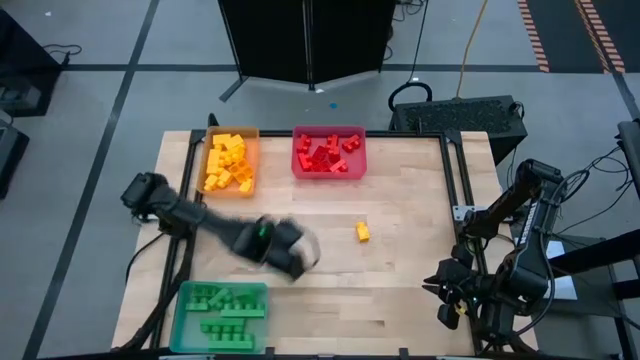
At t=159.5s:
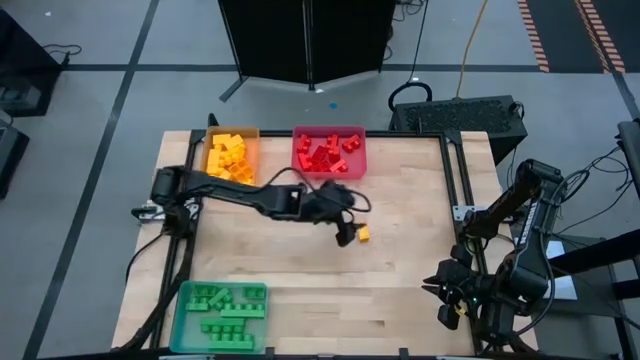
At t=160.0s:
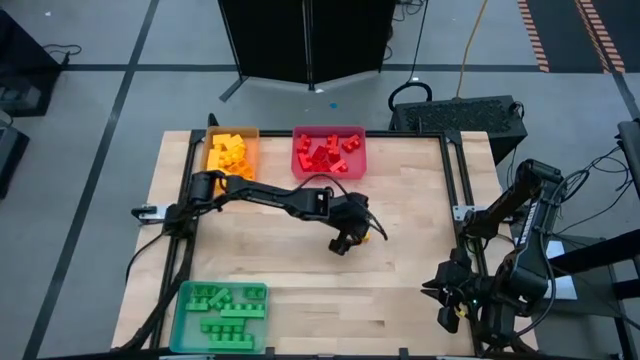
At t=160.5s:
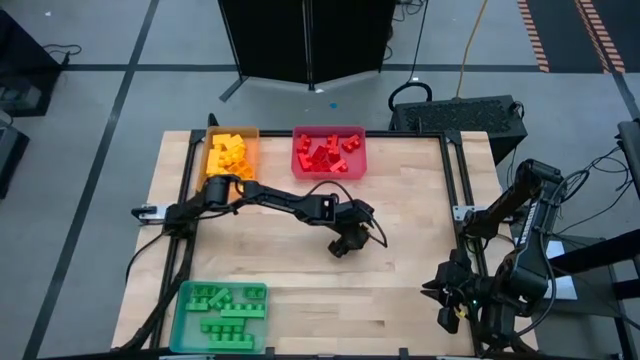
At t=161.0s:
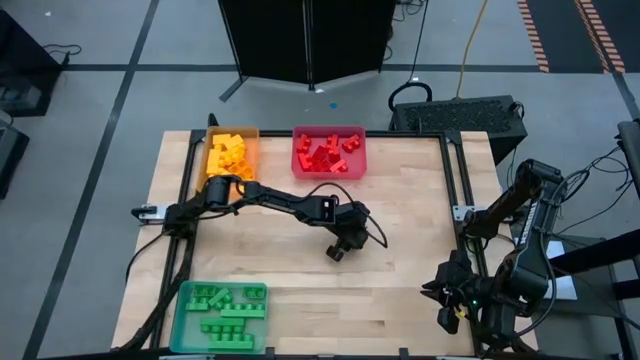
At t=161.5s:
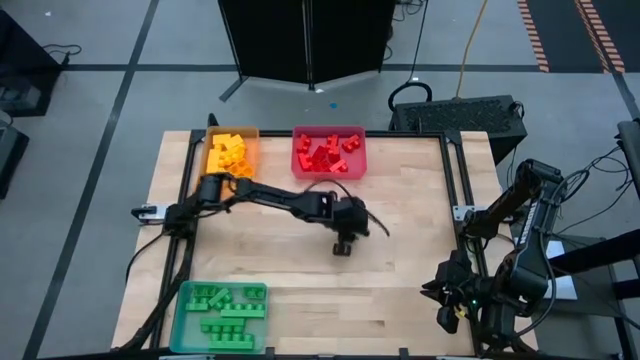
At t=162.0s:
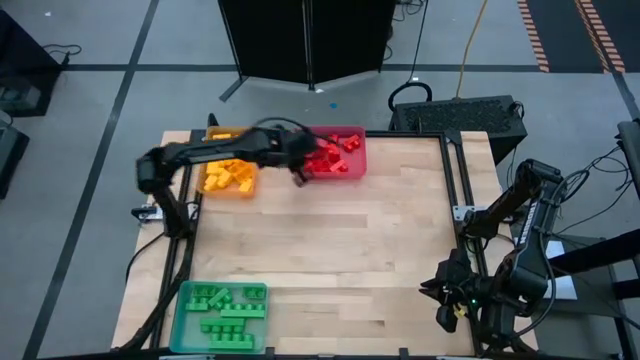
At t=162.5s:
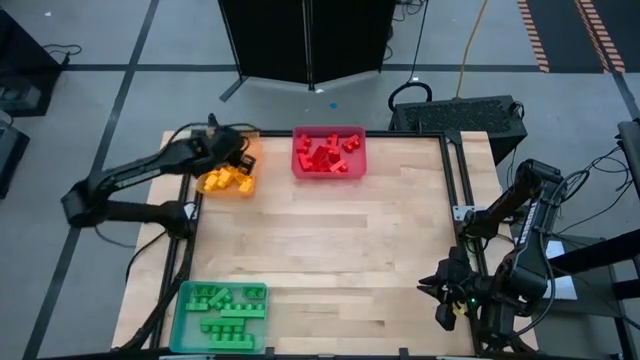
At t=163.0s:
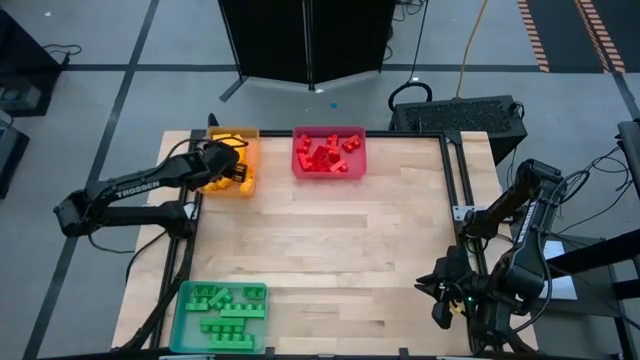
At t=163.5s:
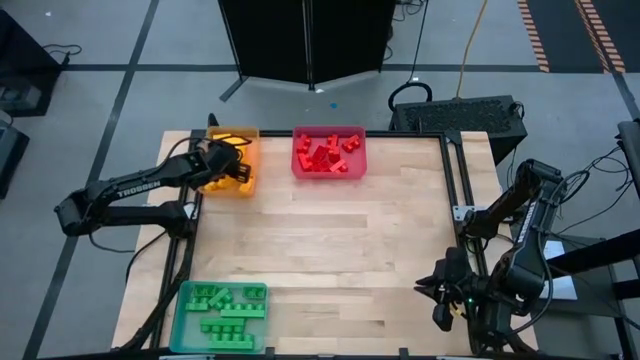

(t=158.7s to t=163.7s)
Task: Sort blocks
Put the yellow game piece into the yellow bin

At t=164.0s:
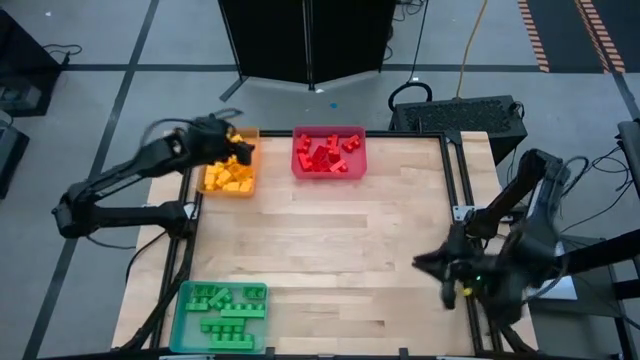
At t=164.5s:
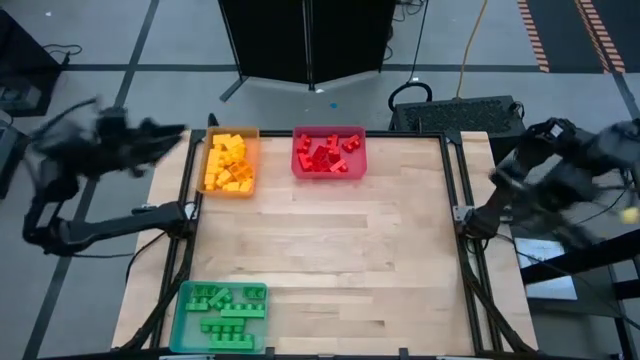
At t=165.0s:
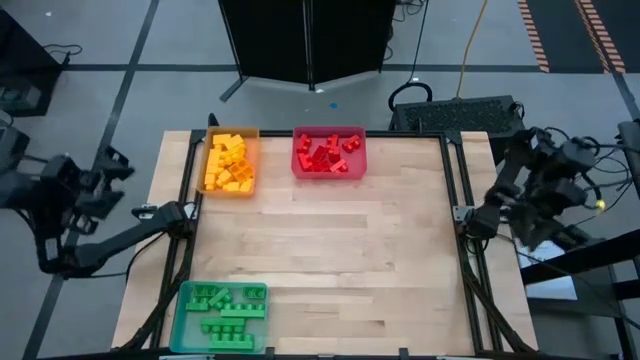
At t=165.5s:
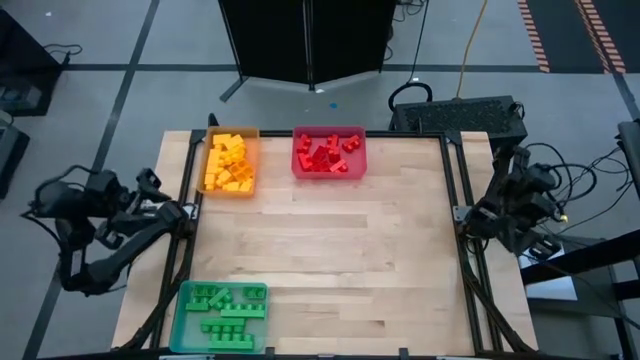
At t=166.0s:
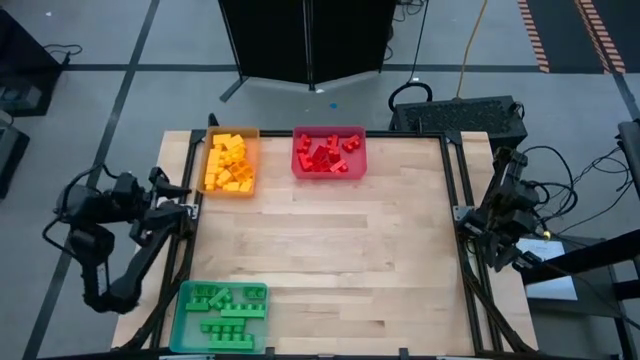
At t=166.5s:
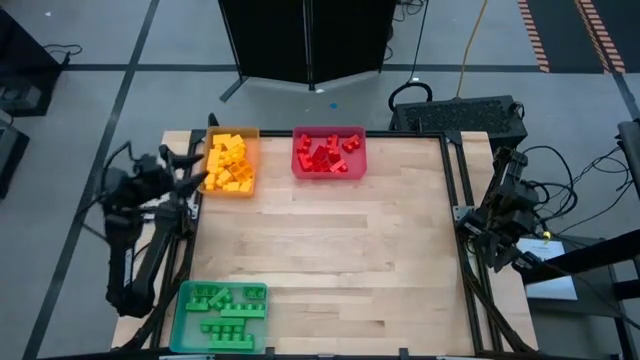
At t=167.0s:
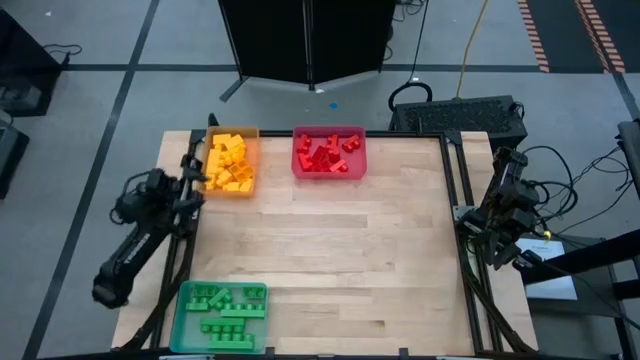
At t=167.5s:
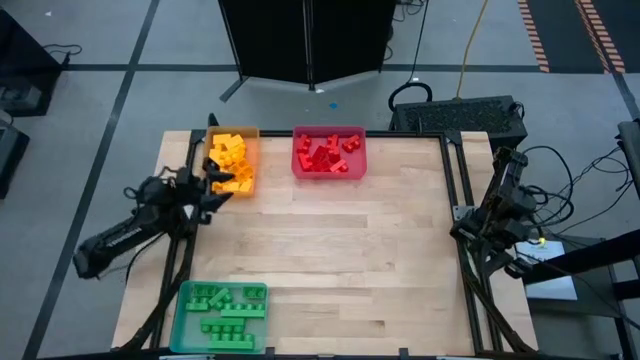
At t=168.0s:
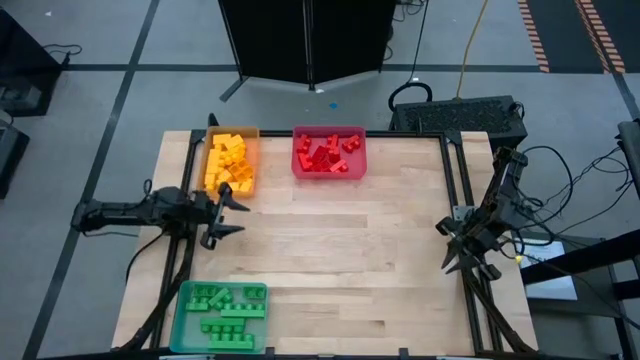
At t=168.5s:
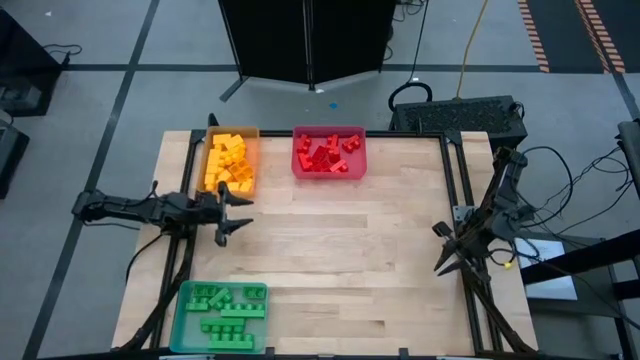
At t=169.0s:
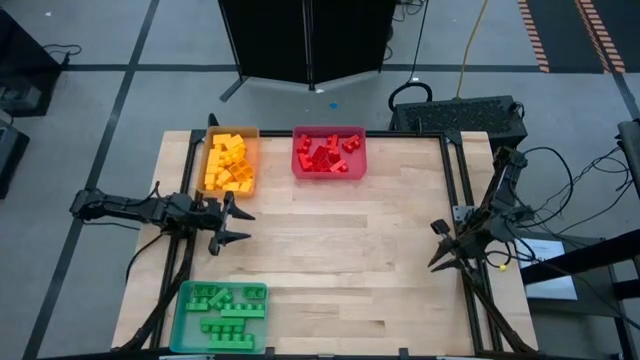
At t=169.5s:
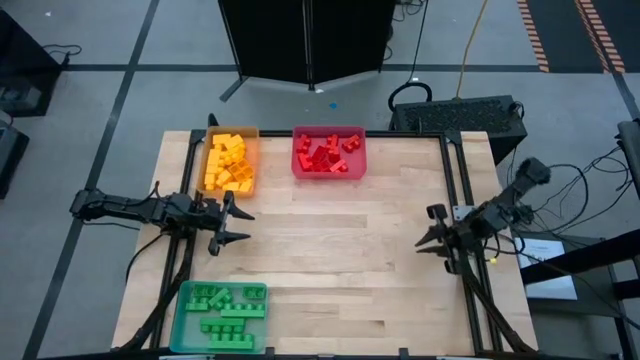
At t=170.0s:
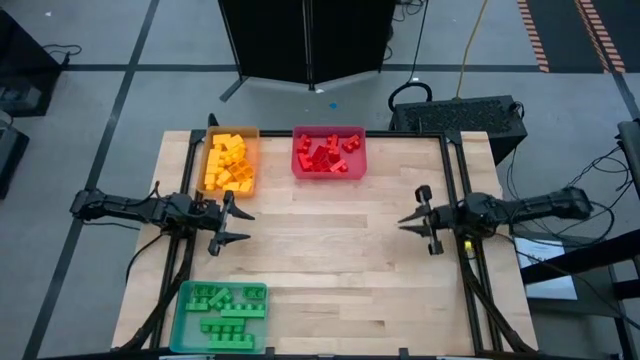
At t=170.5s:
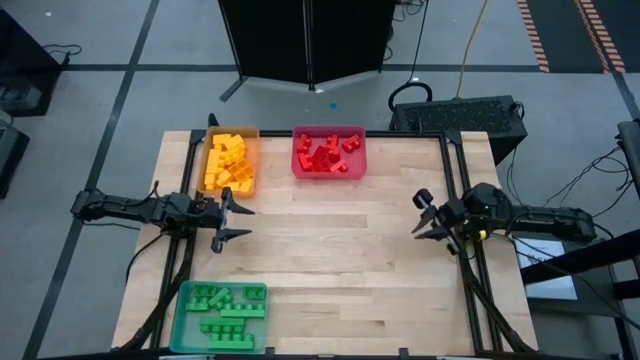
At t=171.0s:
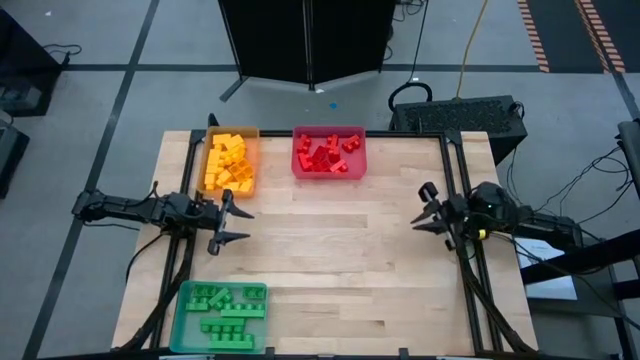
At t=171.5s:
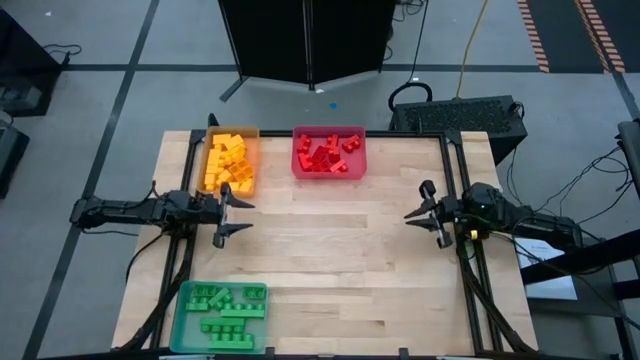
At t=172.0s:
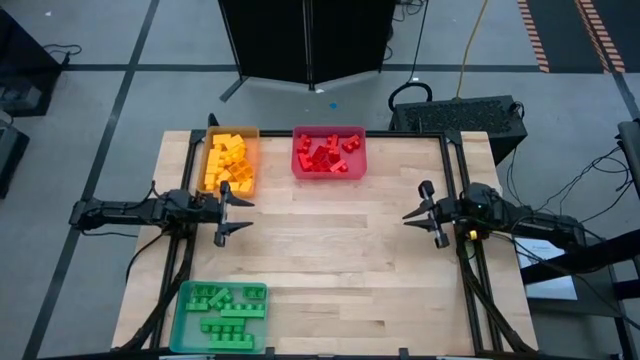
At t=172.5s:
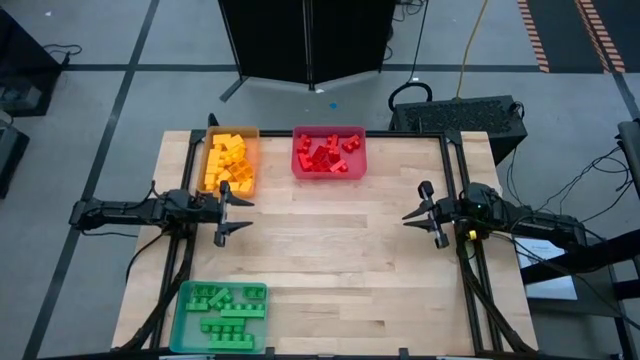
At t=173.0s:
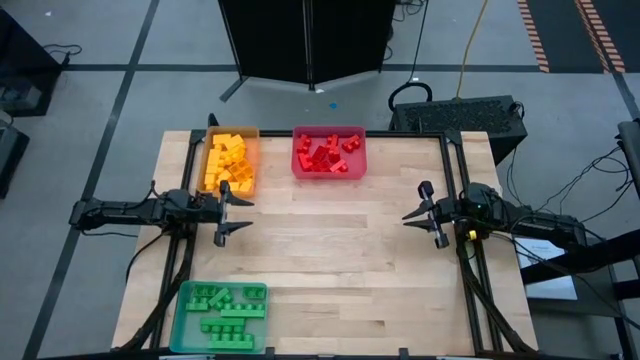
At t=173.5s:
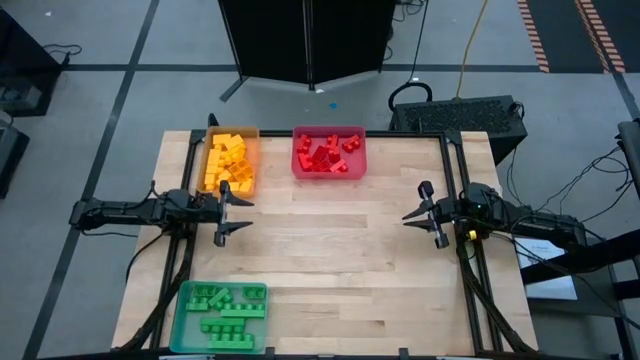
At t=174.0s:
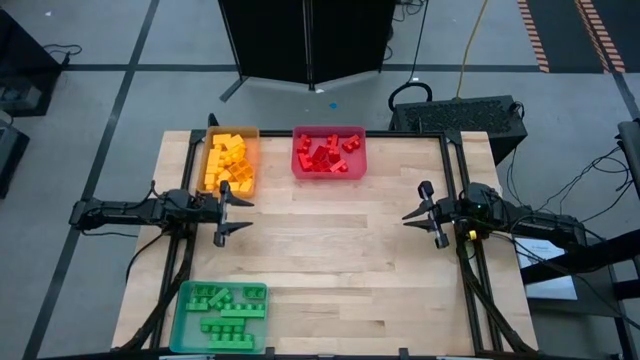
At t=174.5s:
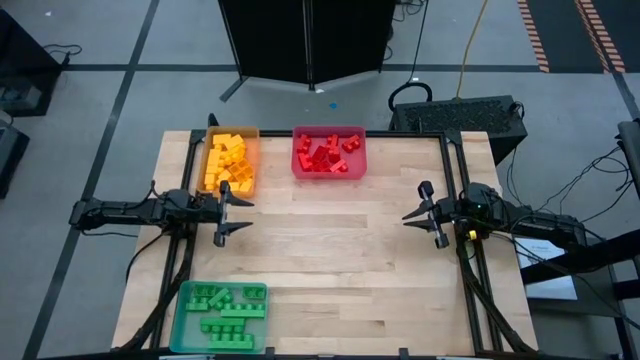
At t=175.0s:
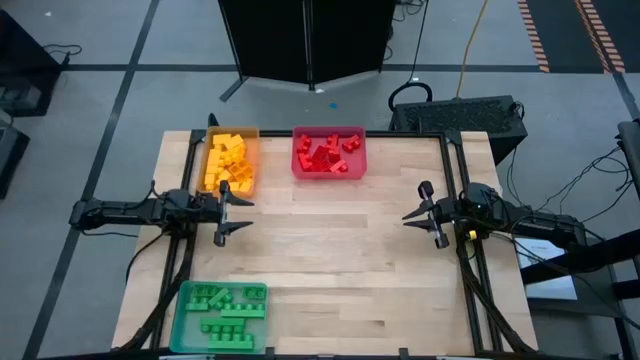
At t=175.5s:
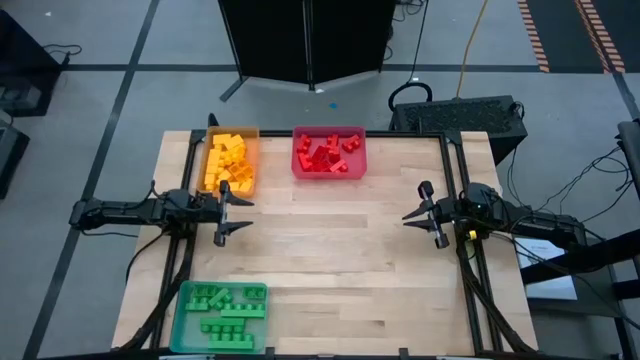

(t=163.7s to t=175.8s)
Return to Home Position
